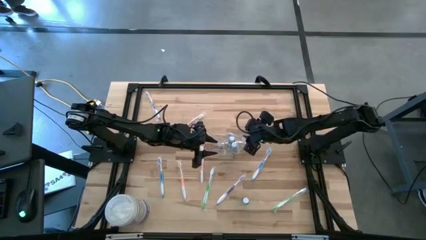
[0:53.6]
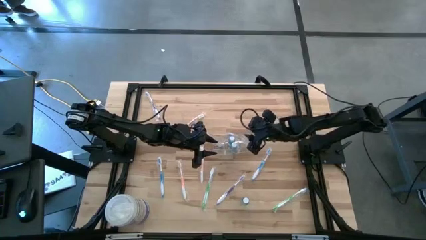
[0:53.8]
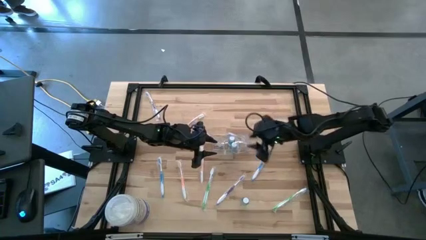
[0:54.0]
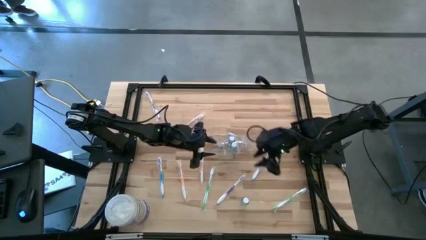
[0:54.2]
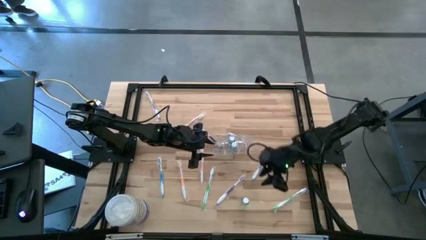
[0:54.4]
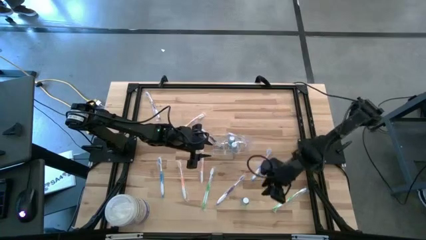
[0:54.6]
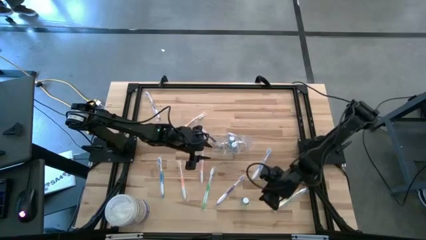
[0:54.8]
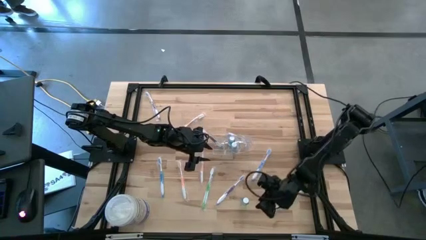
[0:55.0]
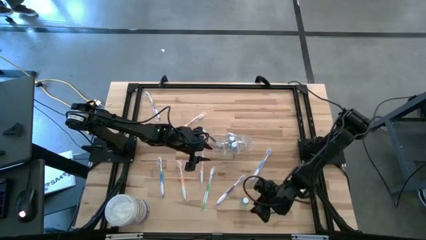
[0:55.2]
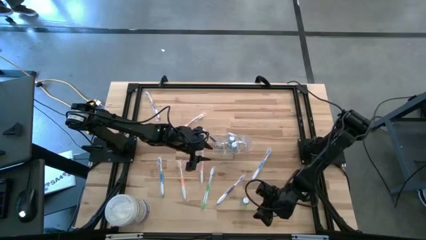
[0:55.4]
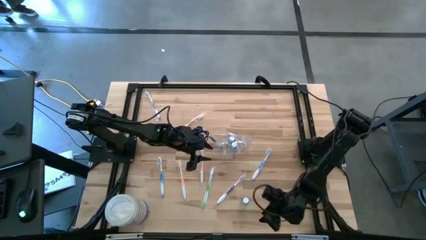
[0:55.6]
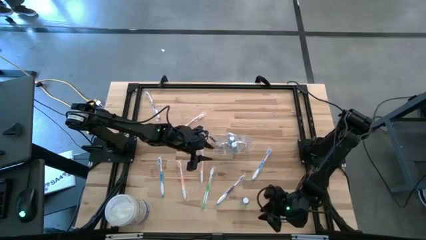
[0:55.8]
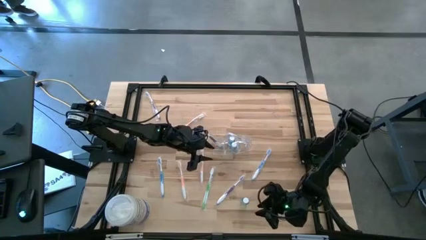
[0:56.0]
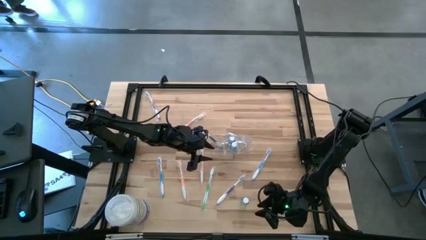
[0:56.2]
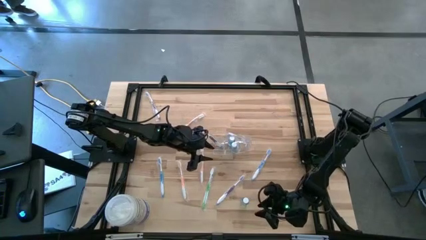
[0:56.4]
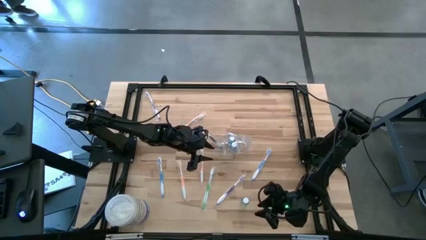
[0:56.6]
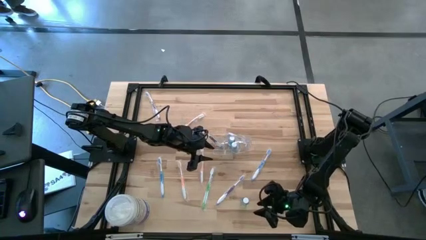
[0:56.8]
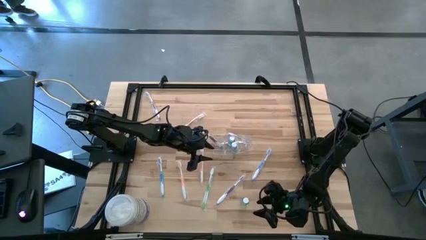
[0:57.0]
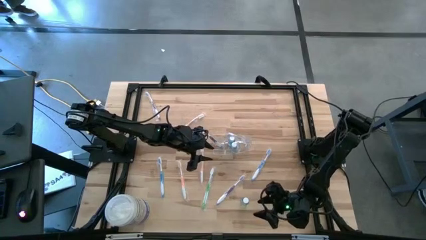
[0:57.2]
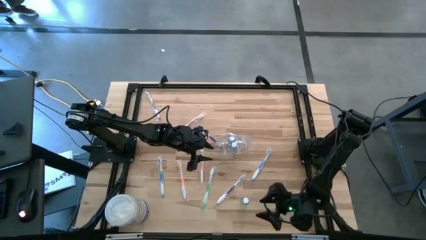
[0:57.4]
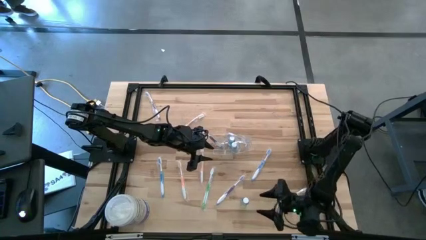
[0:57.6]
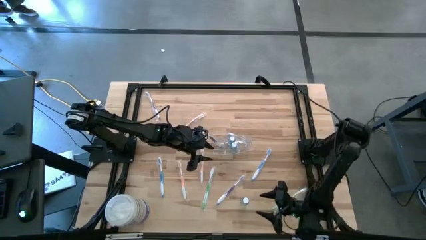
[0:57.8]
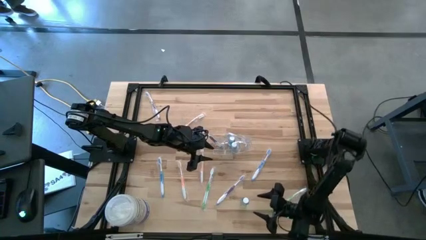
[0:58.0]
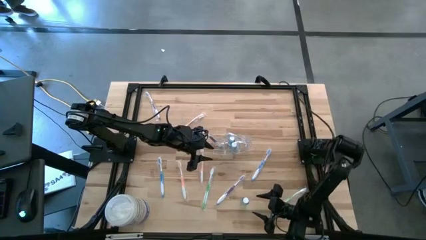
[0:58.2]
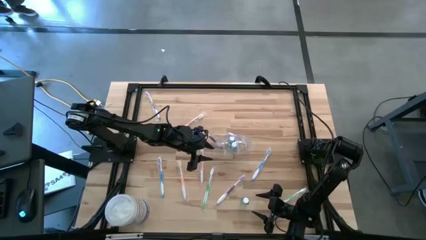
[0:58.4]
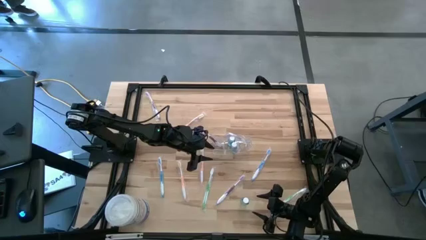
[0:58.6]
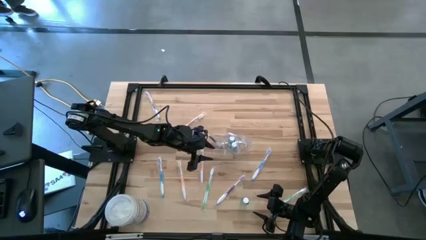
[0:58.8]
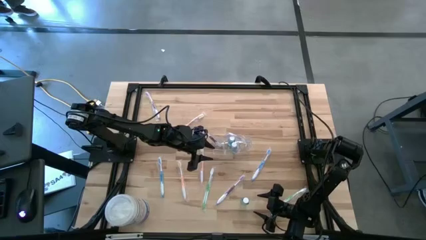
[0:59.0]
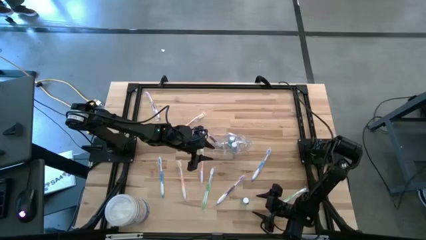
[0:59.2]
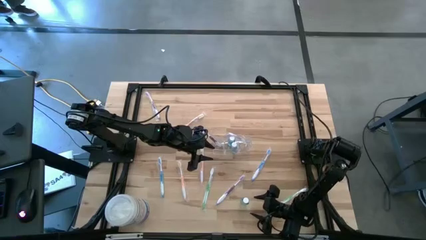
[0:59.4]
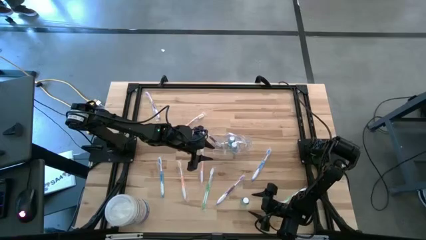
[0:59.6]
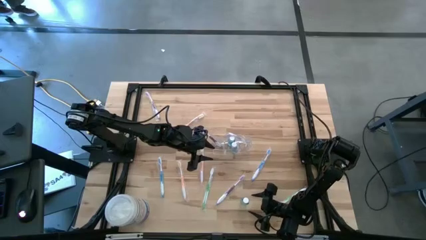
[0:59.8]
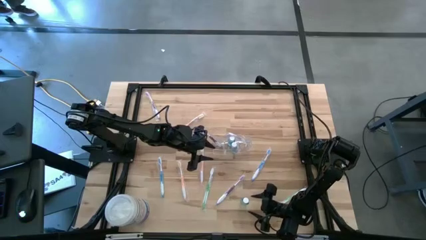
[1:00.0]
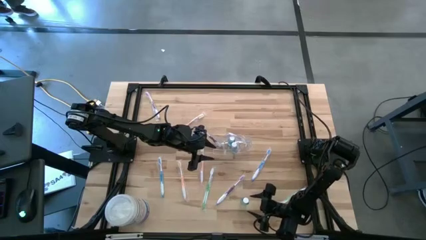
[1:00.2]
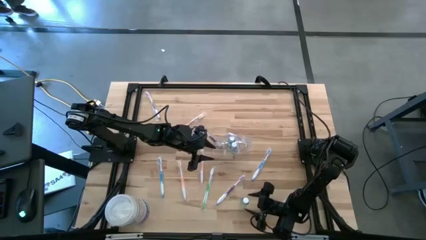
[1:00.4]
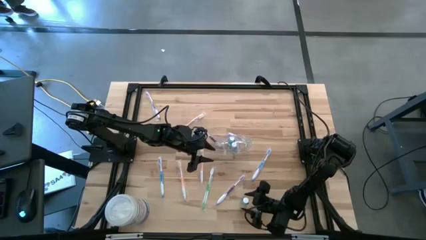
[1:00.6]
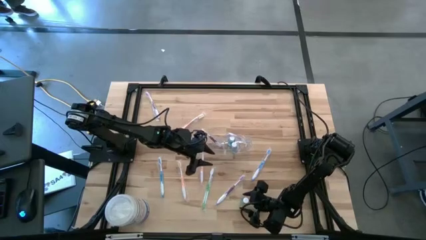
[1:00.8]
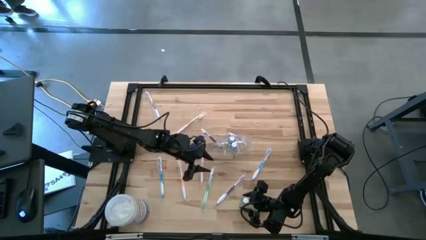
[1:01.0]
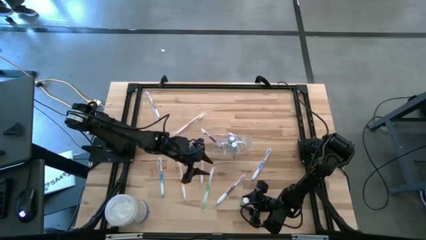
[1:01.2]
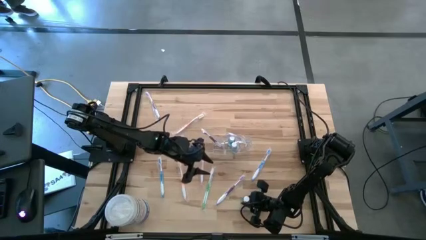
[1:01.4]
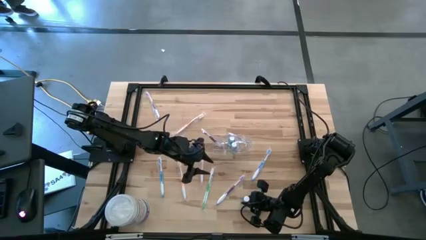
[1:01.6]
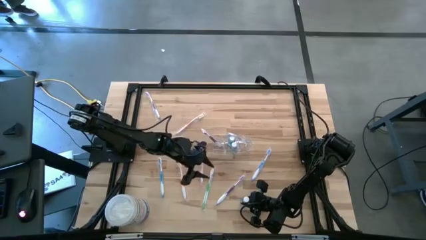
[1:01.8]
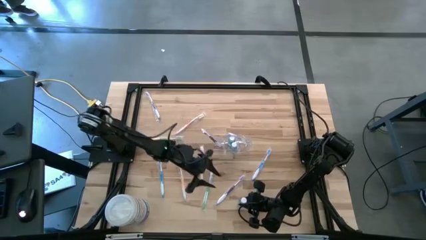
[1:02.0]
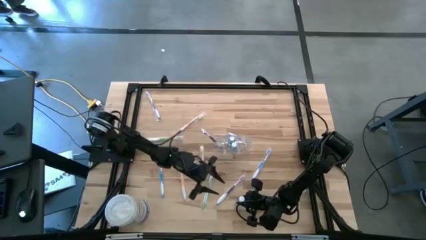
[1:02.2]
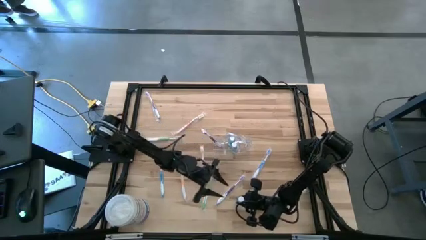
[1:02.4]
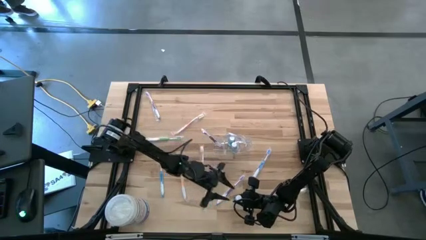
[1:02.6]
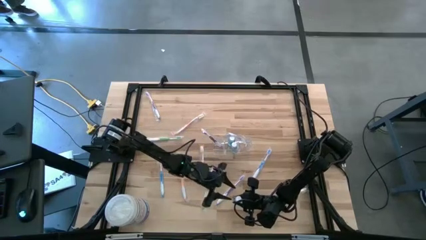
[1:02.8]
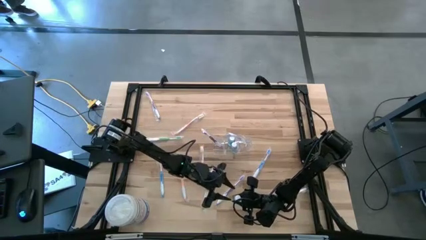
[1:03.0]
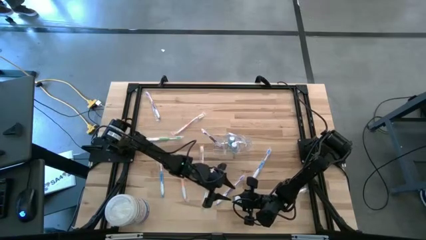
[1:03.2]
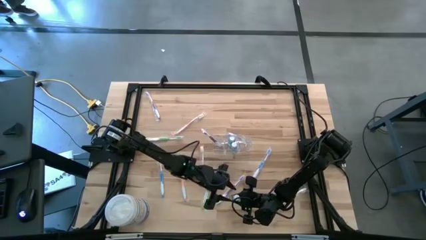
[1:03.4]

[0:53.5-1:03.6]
Task: Pick & Place toothbrushing station
Put the blue mouthwash into the wire organizer
